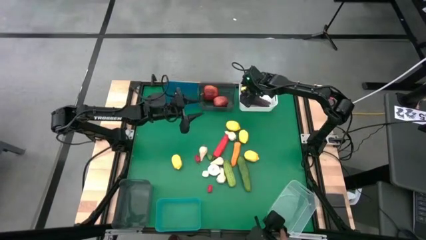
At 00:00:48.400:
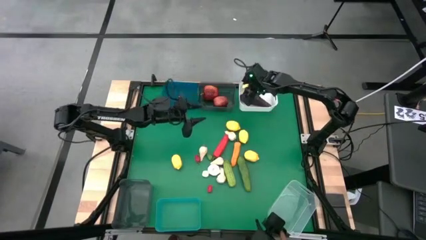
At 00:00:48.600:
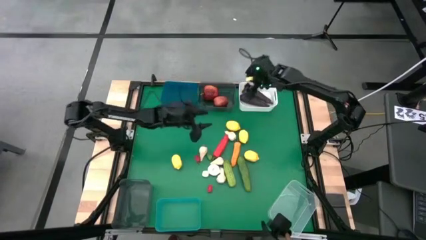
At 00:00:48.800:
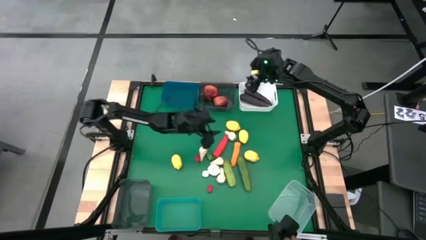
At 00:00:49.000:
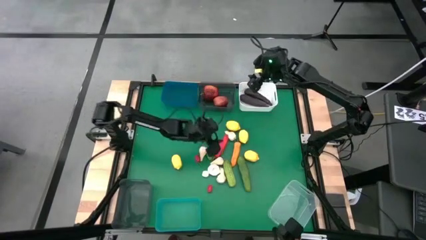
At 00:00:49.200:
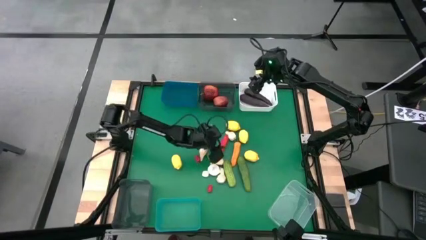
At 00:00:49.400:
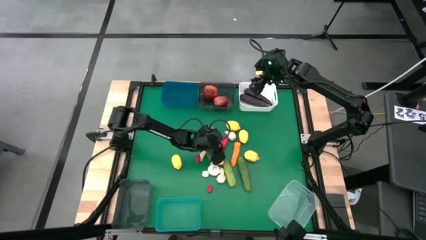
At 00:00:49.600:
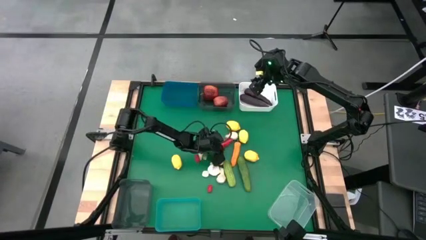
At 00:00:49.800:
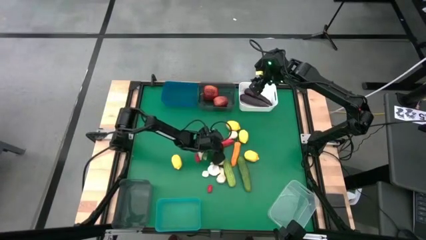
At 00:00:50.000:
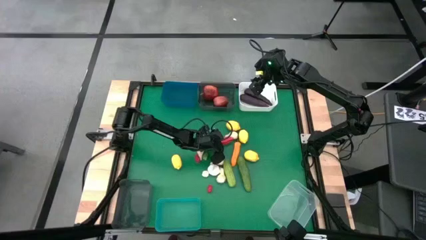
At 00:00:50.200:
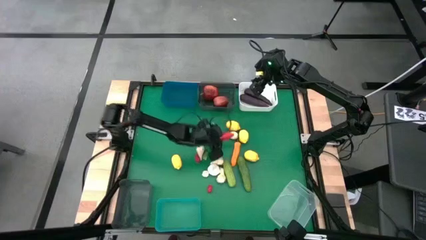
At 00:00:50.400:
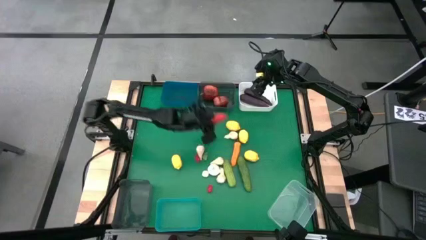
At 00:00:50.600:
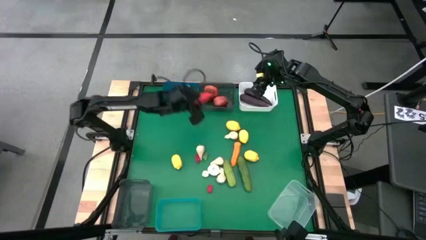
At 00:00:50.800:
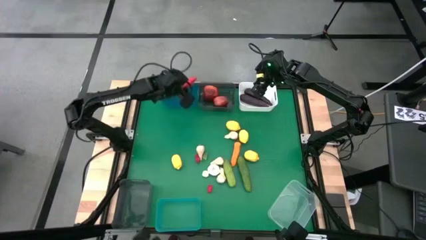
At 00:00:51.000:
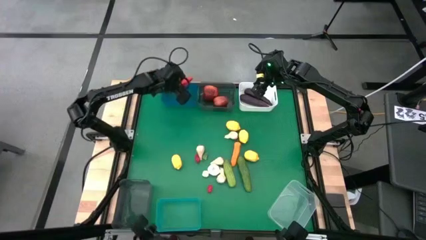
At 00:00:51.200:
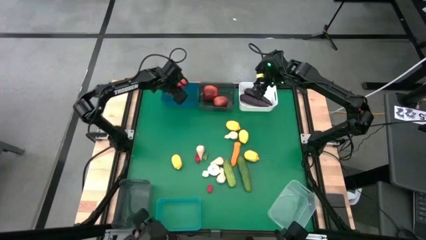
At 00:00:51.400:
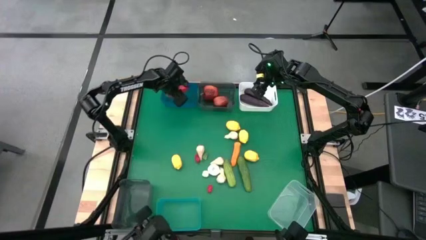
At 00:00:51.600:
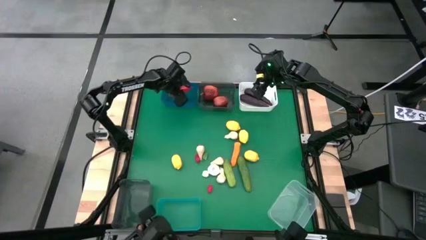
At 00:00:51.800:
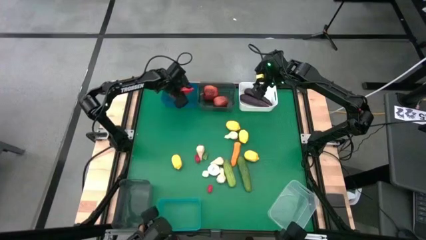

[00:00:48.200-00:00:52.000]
Task: Sort produce into baskets
Put the red chili pepper into the blue bin

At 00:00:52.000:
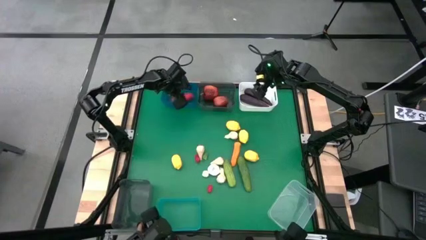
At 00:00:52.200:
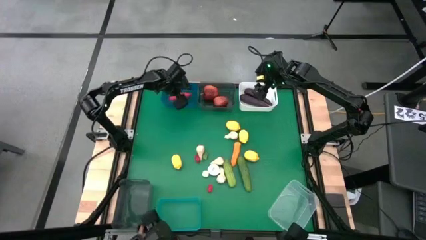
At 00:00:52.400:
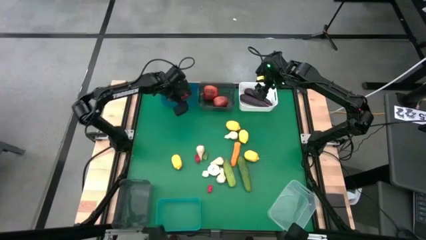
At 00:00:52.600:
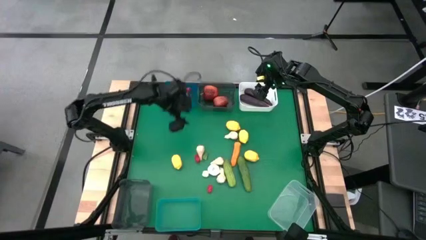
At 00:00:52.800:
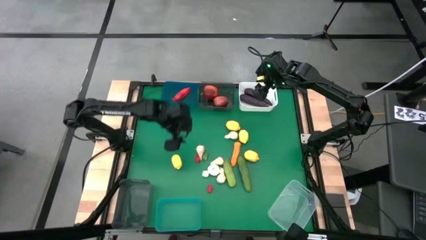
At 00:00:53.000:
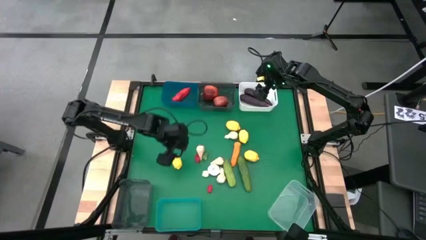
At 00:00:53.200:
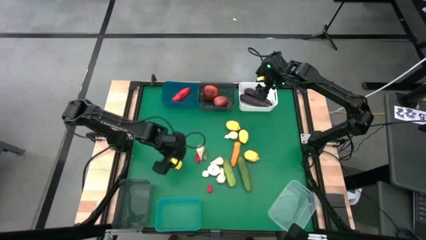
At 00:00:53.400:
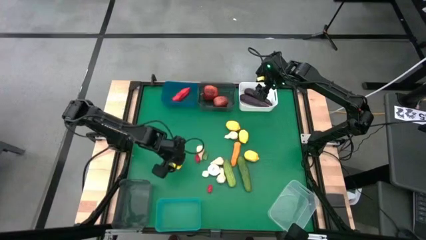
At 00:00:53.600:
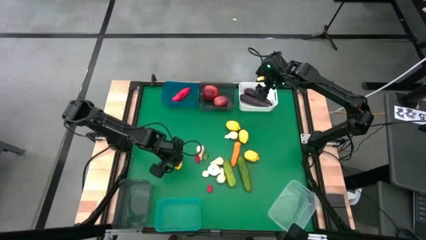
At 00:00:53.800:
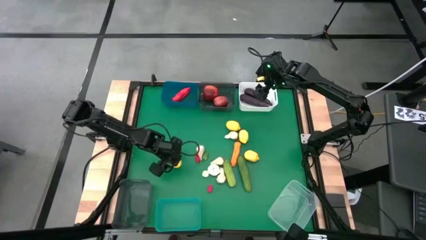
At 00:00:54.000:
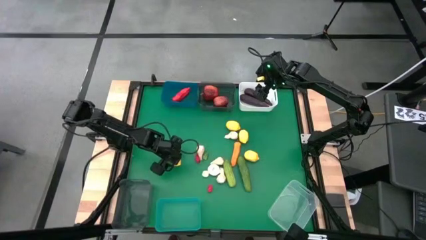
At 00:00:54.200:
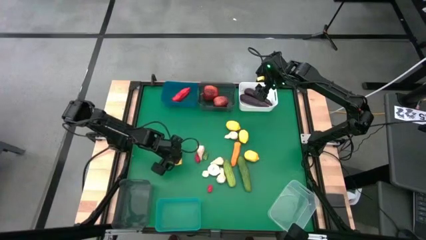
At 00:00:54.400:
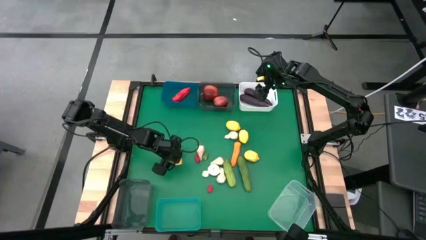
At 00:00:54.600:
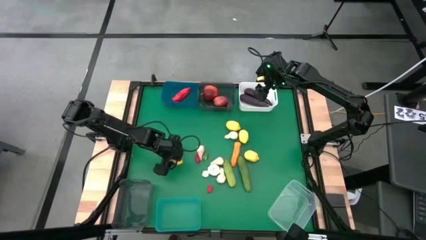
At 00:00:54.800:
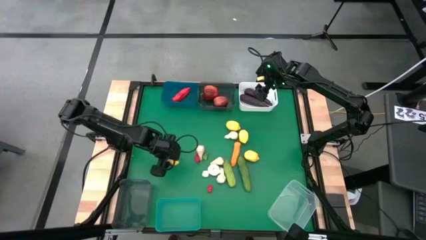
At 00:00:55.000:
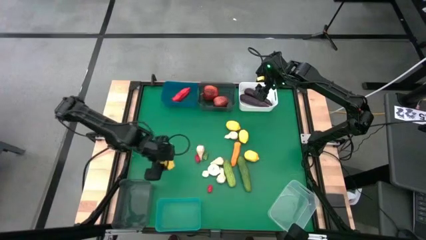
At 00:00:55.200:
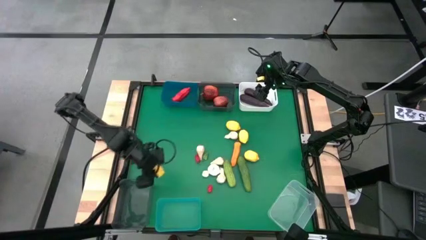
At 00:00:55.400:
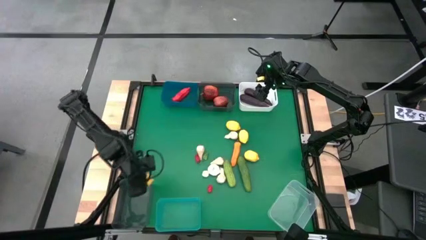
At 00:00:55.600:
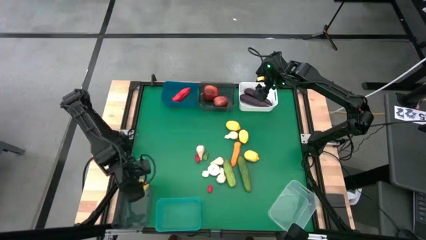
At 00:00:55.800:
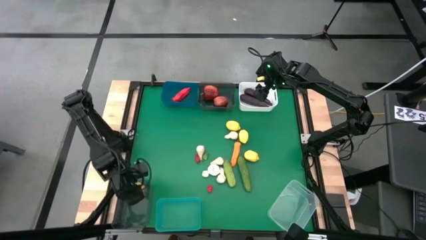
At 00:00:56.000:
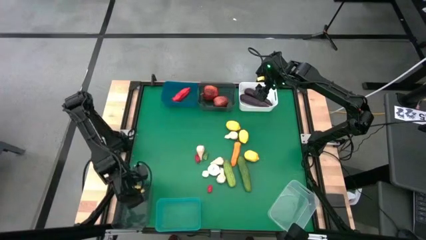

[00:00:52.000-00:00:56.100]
Put the yellow lemon into the bottom black bin

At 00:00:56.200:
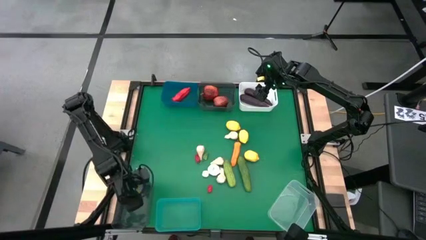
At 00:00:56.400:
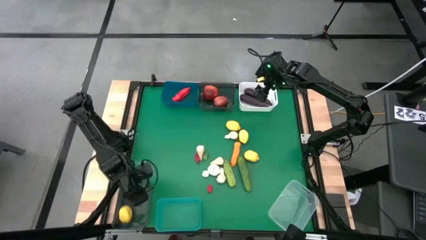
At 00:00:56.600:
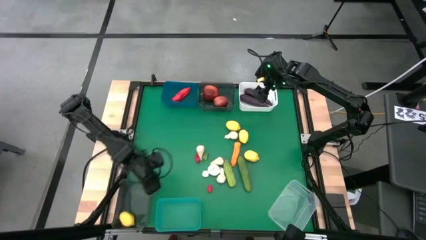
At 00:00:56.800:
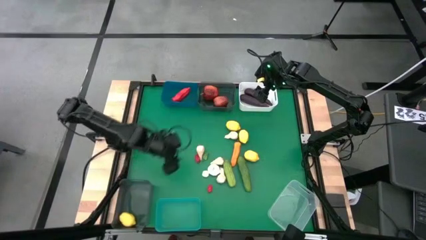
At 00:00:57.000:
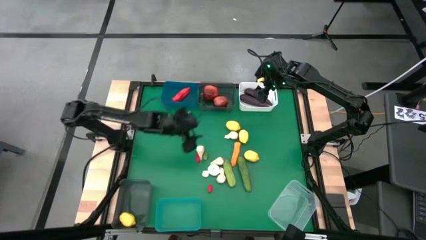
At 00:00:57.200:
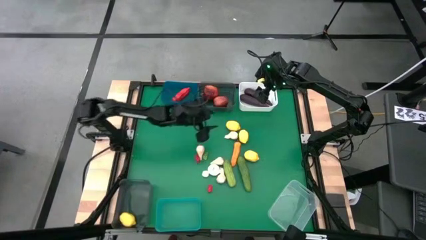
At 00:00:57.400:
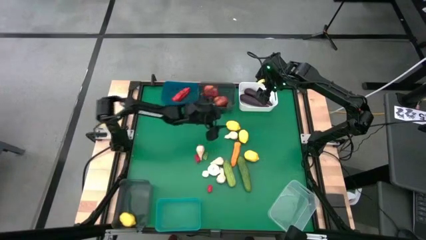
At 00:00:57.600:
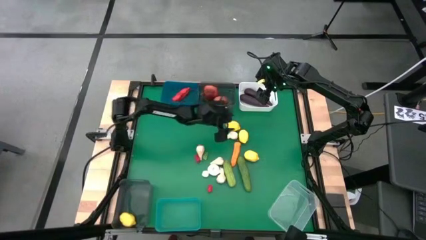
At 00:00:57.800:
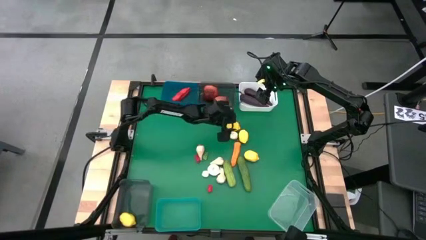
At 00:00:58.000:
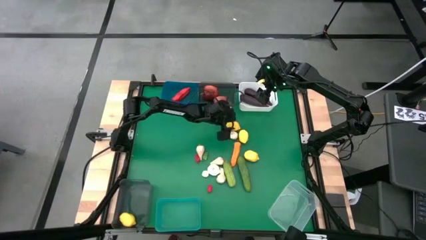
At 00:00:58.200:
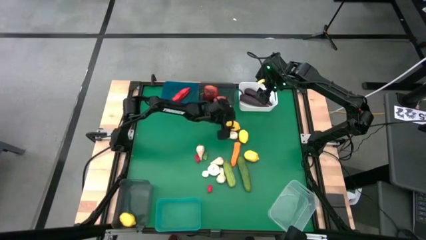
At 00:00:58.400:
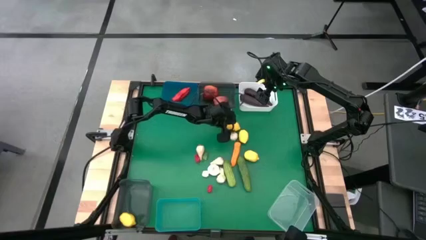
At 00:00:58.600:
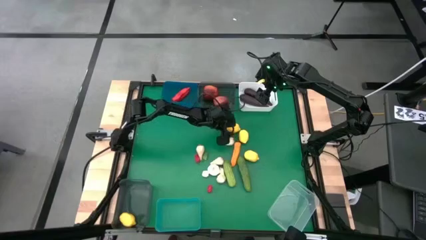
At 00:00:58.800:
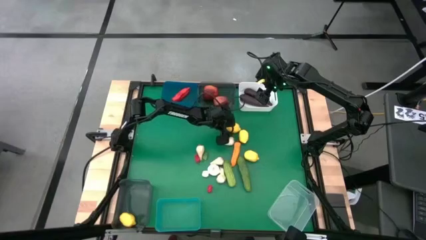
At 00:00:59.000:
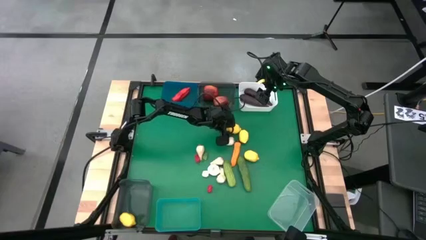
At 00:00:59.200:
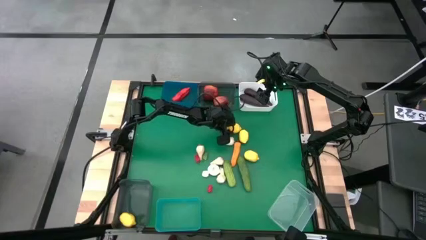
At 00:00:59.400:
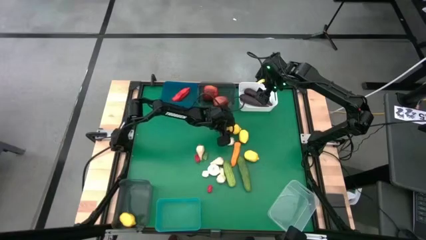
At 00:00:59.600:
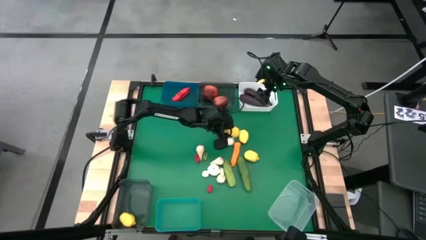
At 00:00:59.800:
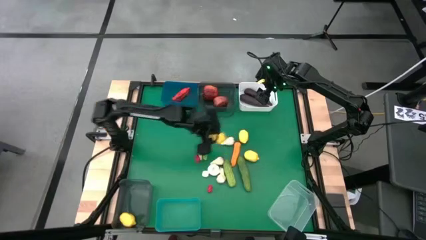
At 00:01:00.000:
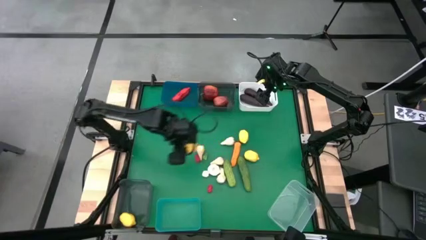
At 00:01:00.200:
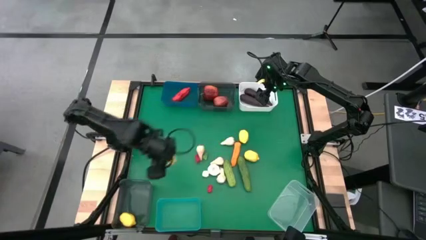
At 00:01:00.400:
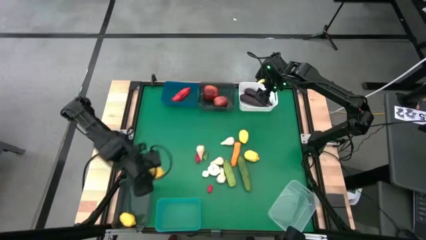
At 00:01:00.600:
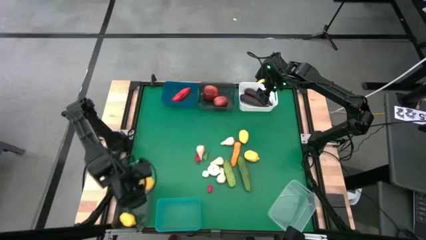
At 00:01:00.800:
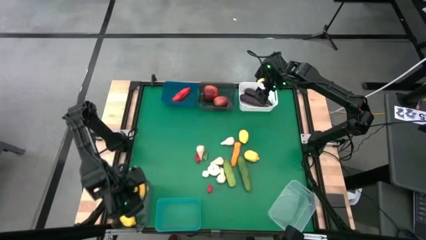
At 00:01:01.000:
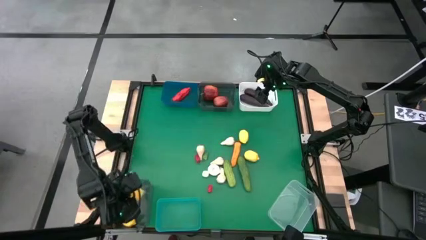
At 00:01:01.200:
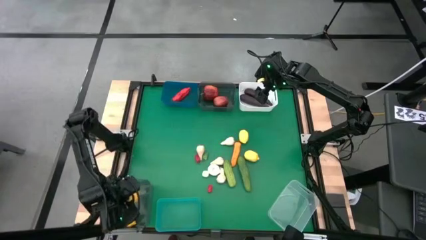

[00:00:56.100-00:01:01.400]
Put the yellow lemon into the bottom black bin

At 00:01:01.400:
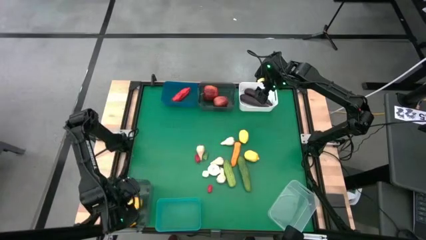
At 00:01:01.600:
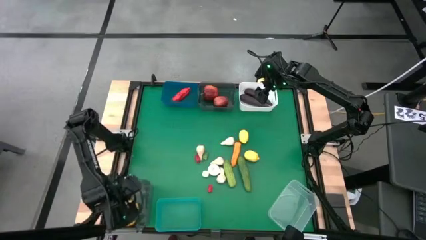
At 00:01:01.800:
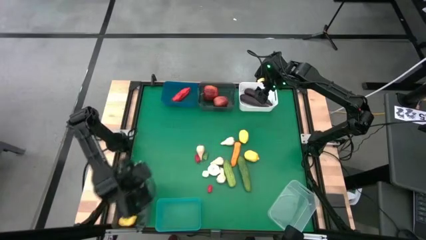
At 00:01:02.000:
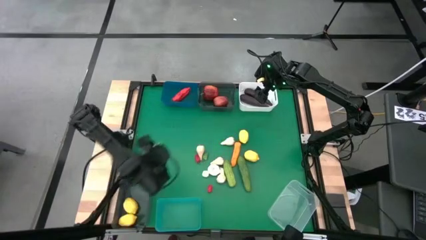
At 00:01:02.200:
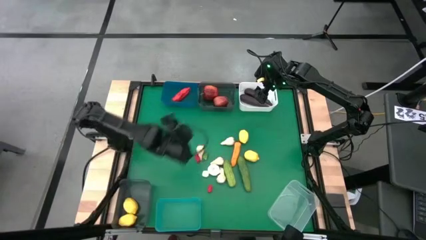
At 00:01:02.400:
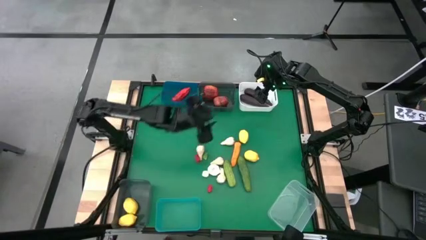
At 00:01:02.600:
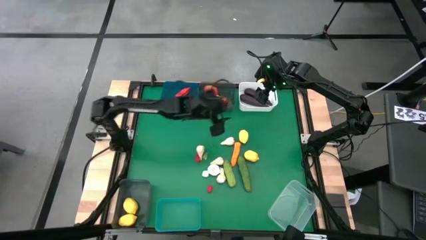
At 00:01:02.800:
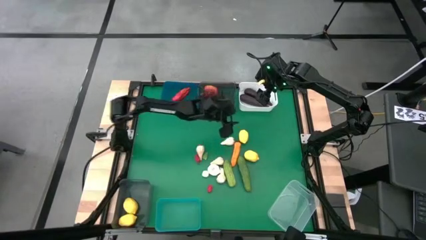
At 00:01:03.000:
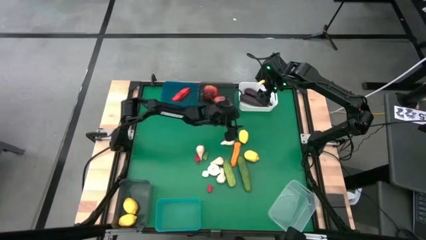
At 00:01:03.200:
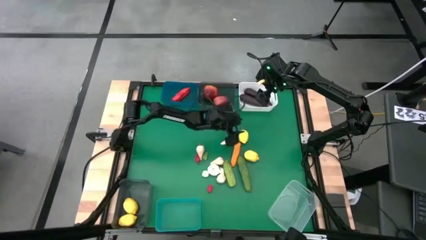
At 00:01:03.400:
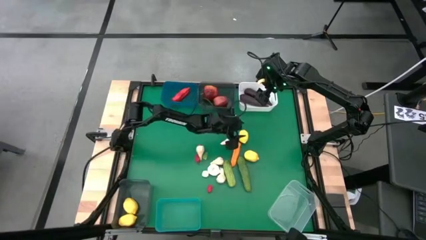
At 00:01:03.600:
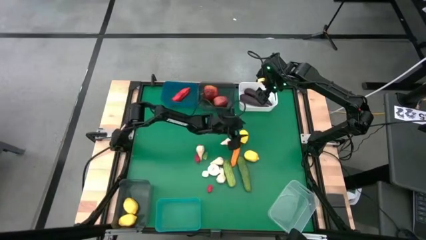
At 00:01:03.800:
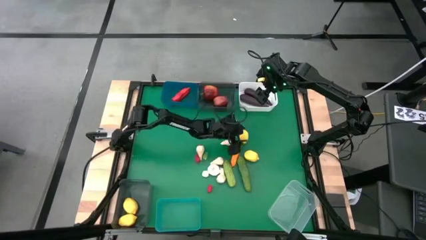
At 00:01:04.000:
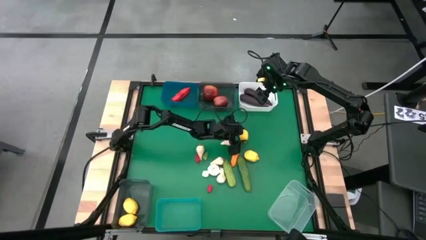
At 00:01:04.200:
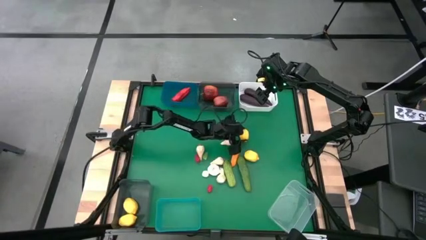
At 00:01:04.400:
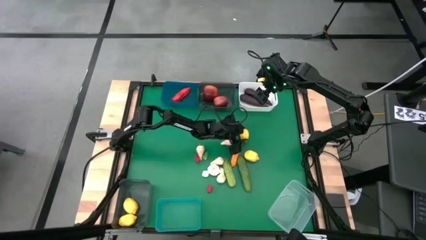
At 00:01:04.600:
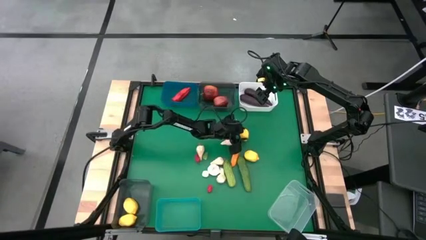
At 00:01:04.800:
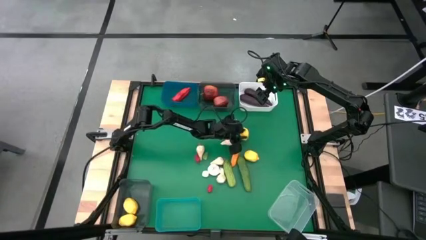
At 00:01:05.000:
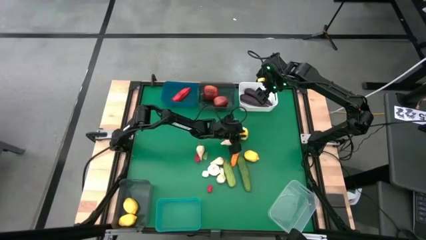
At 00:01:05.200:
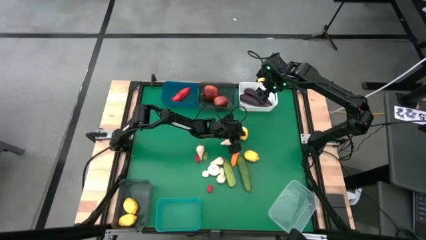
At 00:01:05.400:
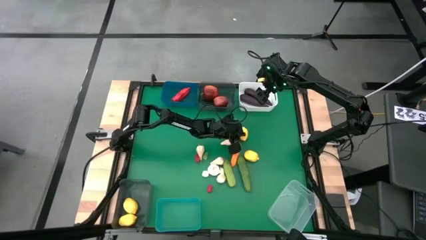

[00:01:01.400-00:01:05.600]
Put the yellow lemon into the bottom black bin
